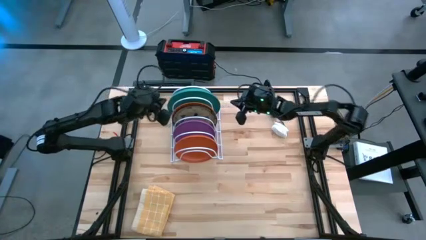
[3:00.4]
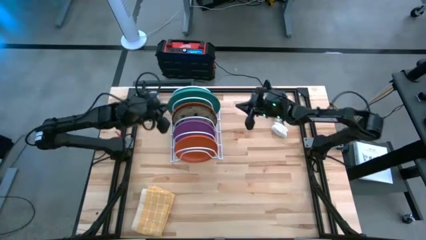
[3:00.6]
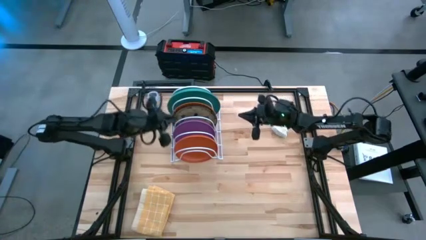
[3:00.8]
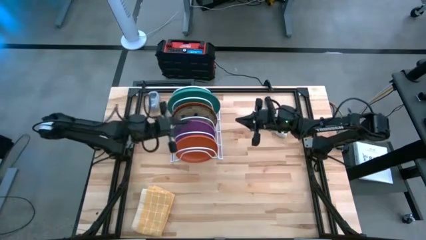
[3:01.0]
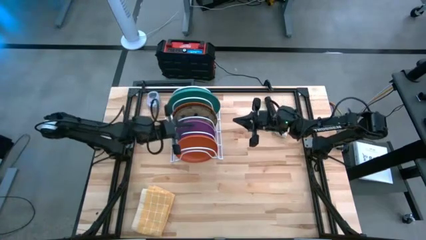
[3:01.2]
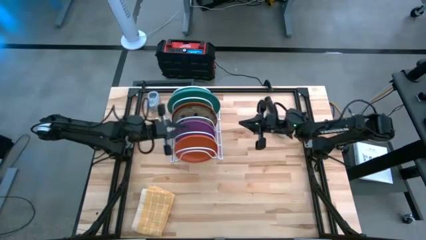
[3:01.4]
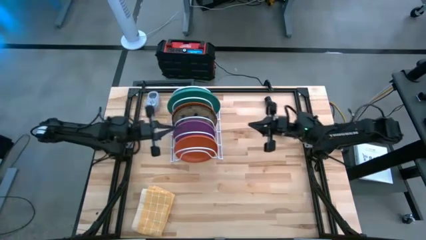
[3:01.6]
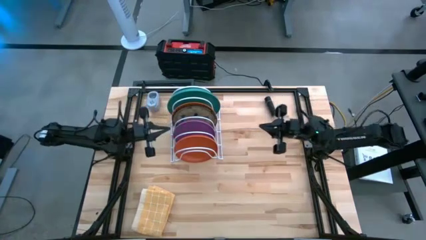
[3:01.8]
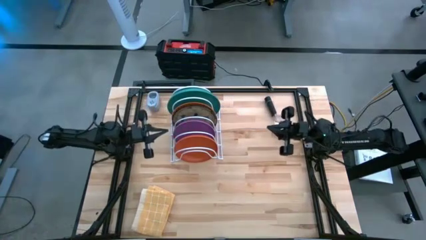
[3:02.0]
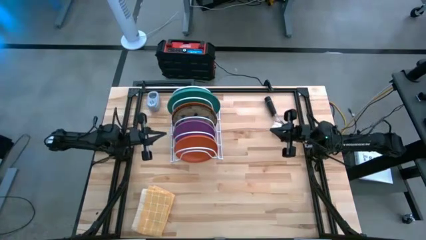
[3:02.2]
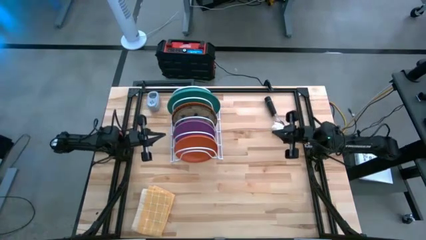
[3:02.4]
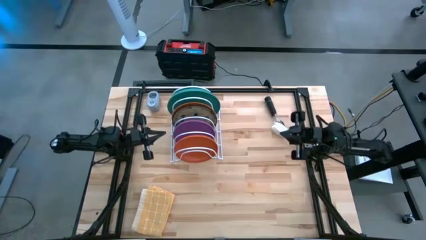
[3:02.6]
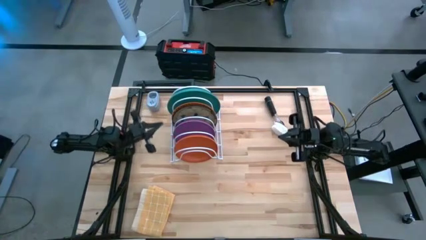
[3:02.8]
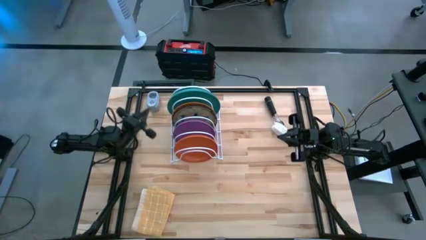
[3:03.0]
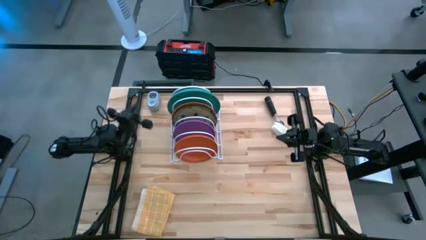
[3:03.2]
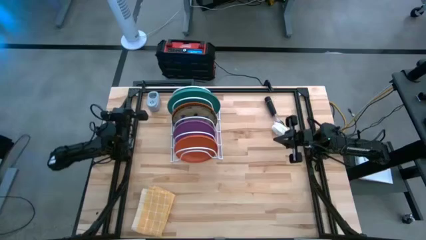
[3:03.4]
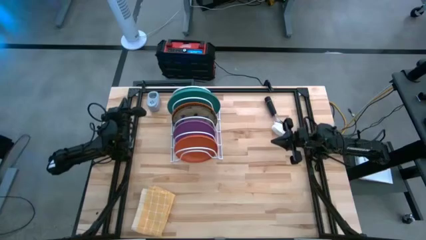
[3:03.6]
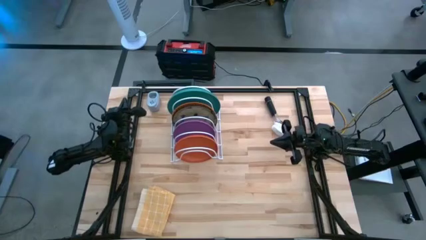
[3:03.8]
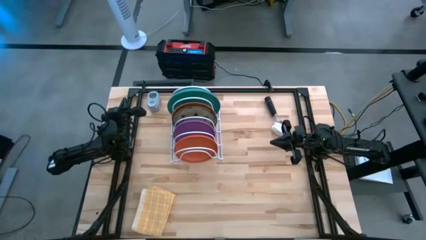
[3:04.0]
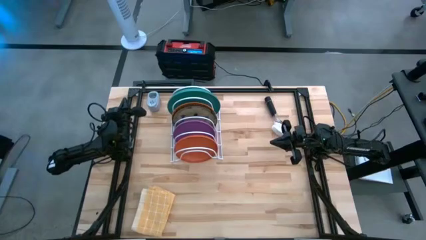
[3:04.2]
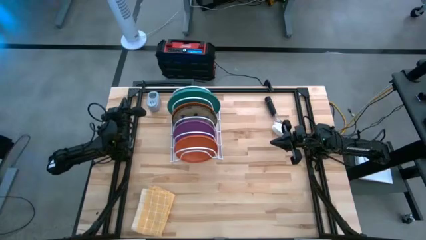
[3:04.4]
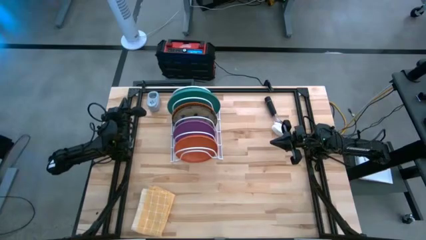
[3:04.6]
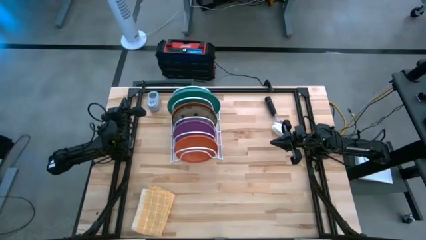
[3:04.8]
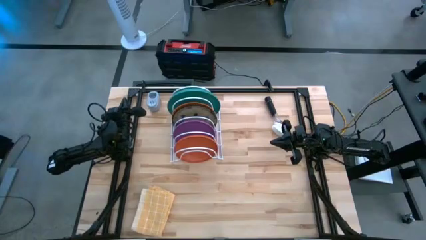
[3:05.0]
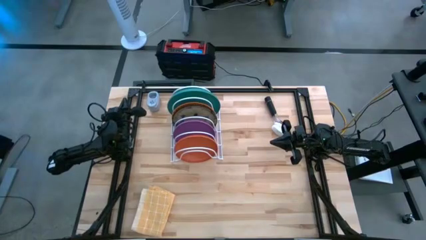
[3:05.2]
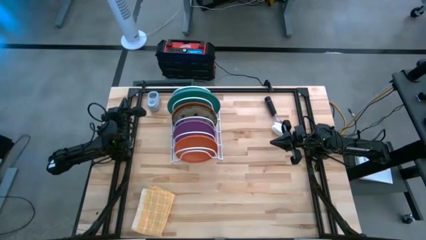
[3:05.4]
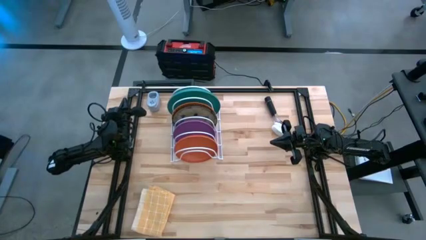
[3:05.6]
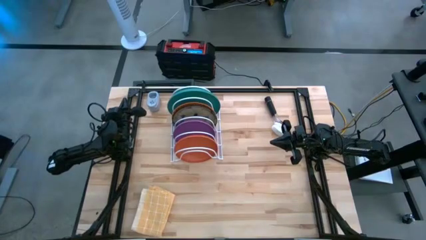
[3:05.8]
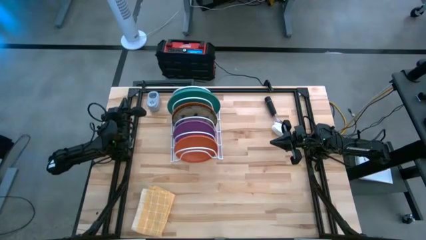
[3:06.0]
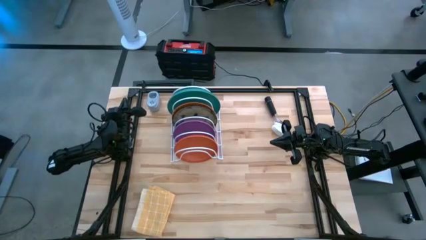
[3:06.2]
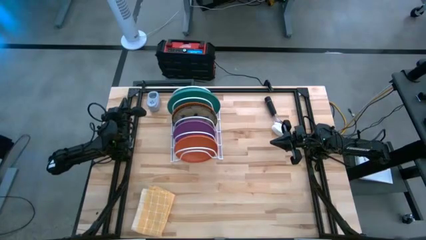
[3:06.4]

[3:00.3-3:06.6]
Task: Sort dishes
Return to Home Position

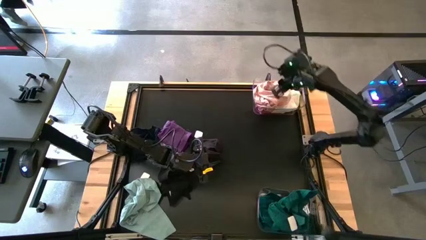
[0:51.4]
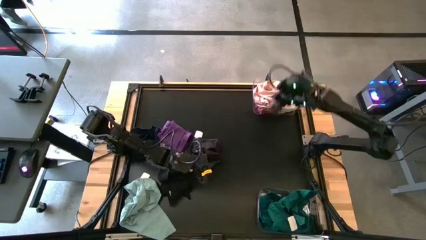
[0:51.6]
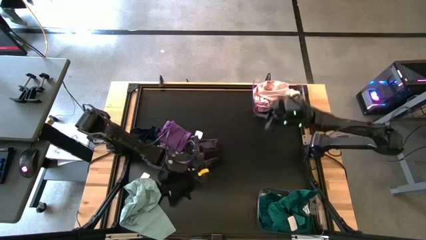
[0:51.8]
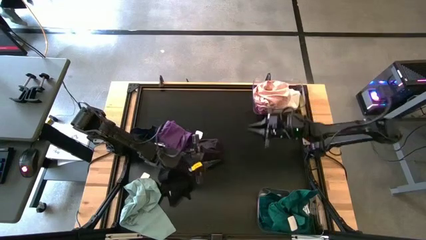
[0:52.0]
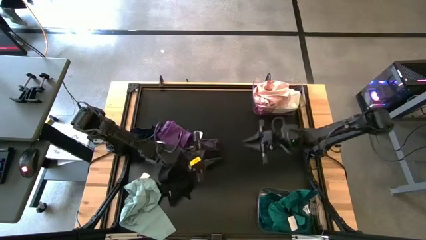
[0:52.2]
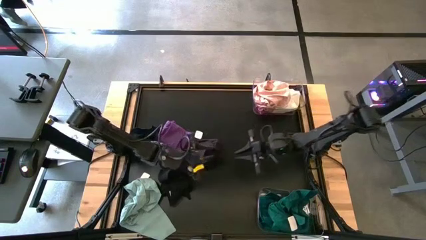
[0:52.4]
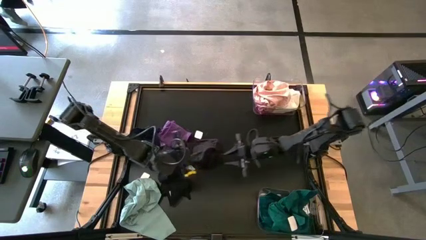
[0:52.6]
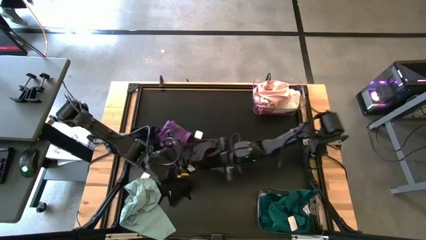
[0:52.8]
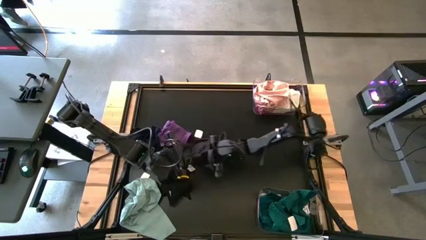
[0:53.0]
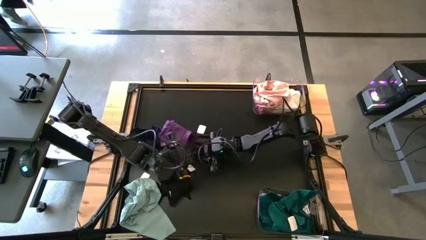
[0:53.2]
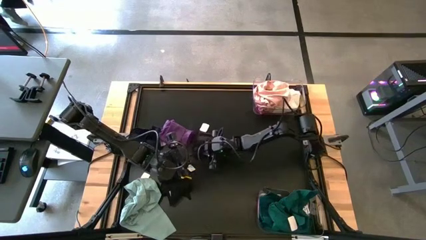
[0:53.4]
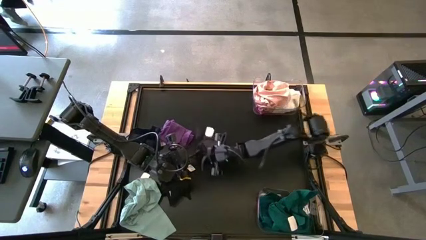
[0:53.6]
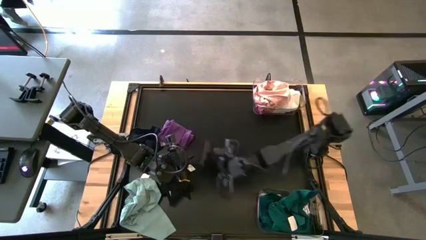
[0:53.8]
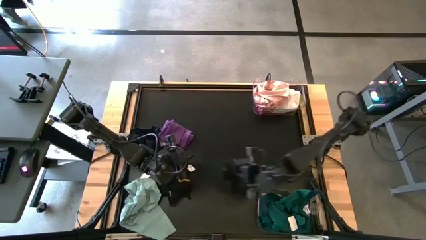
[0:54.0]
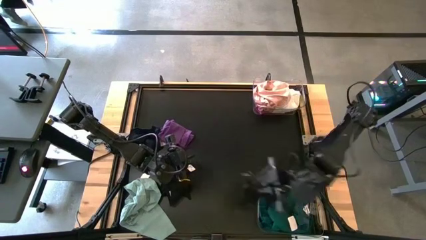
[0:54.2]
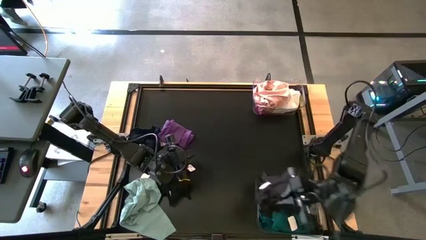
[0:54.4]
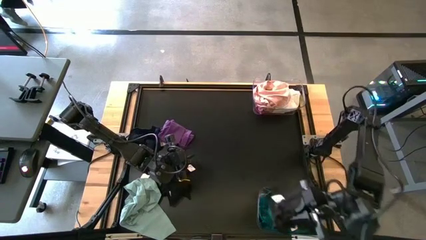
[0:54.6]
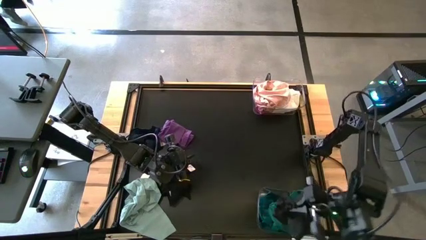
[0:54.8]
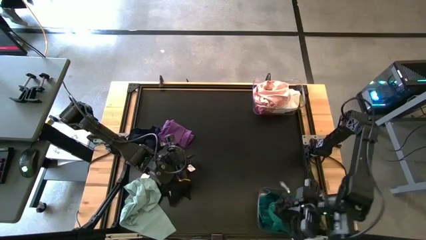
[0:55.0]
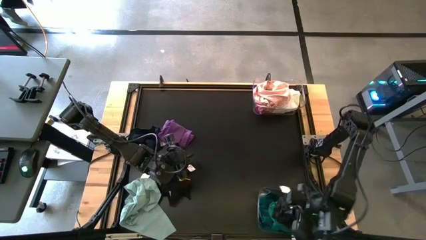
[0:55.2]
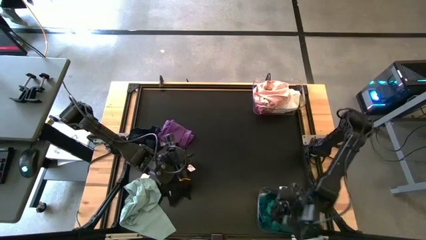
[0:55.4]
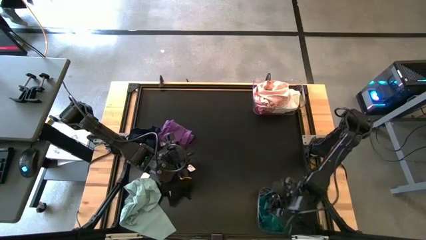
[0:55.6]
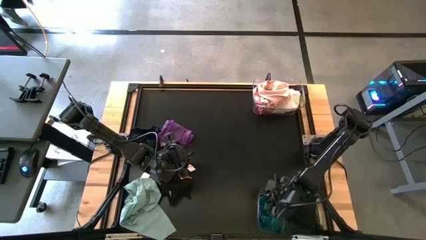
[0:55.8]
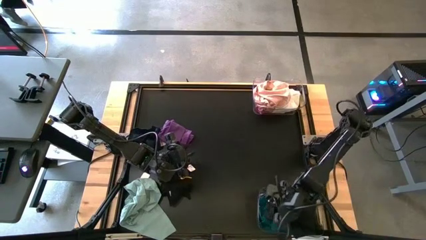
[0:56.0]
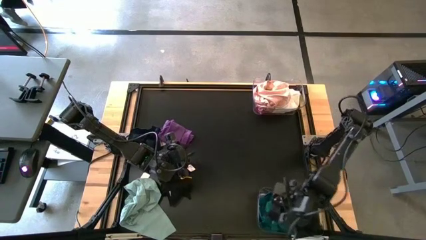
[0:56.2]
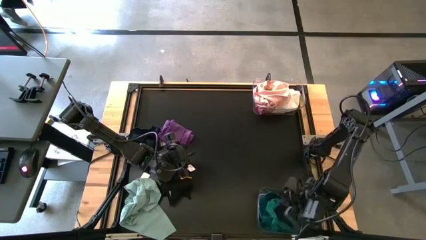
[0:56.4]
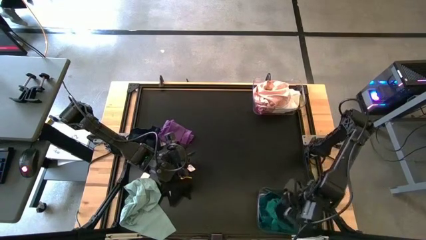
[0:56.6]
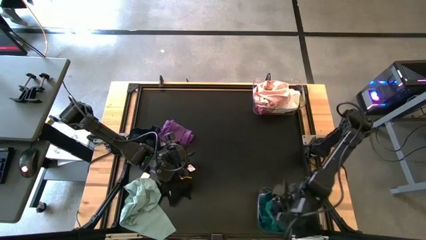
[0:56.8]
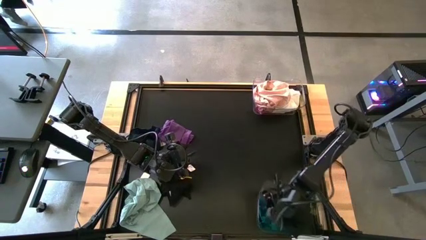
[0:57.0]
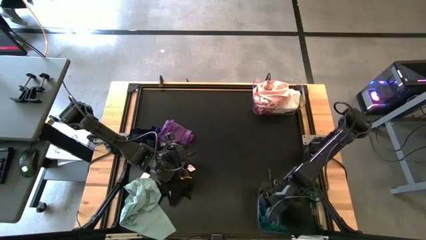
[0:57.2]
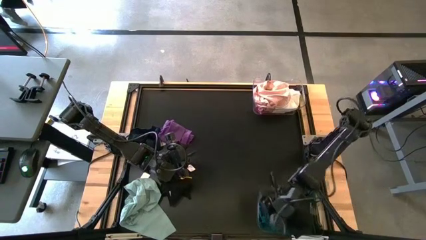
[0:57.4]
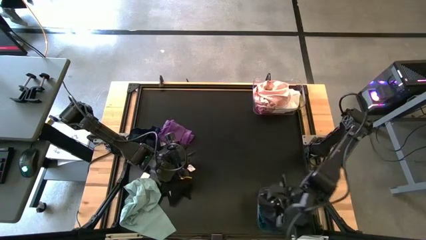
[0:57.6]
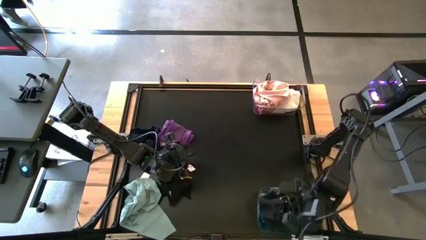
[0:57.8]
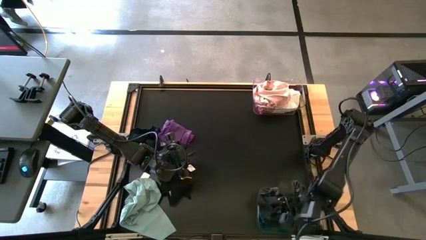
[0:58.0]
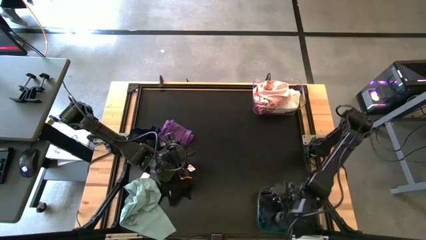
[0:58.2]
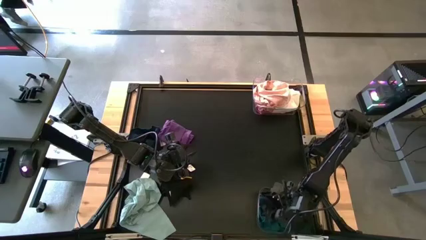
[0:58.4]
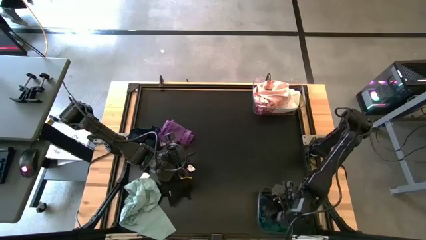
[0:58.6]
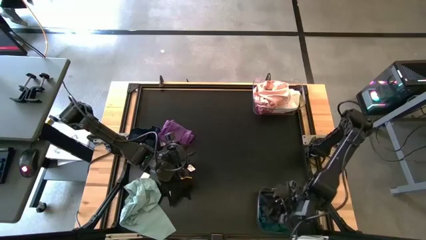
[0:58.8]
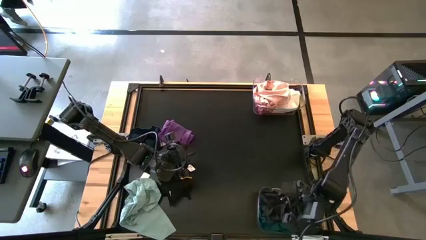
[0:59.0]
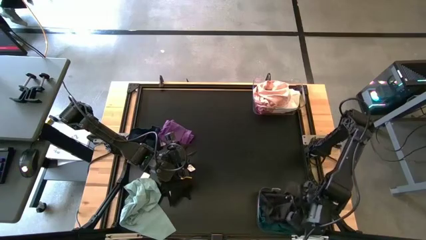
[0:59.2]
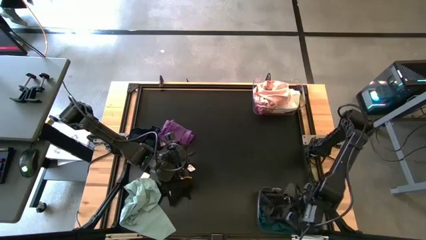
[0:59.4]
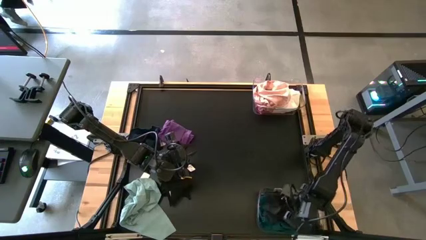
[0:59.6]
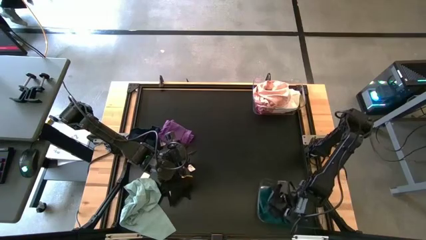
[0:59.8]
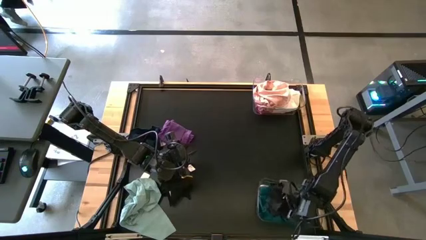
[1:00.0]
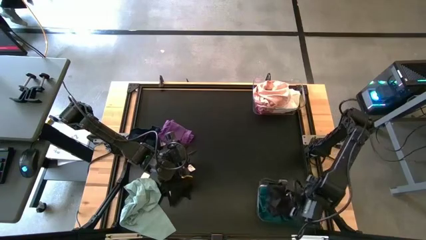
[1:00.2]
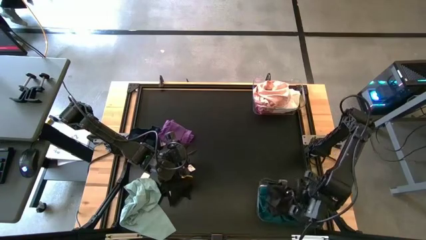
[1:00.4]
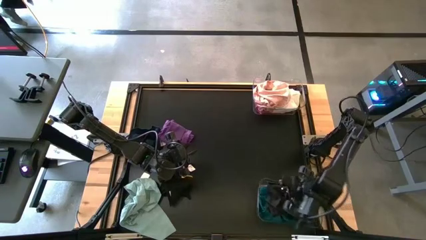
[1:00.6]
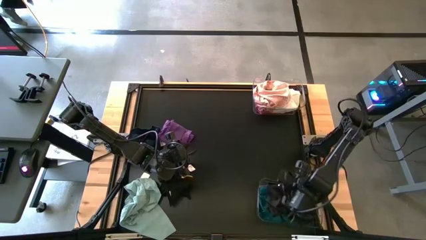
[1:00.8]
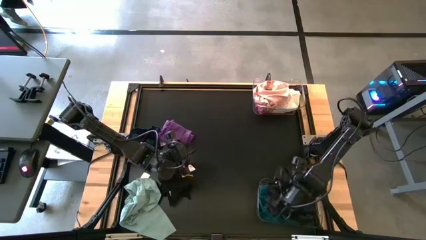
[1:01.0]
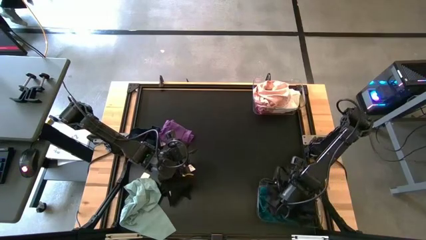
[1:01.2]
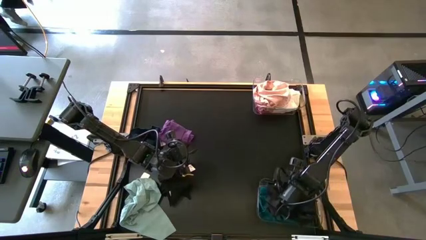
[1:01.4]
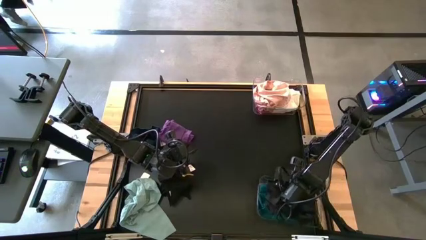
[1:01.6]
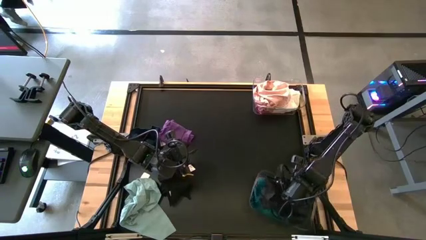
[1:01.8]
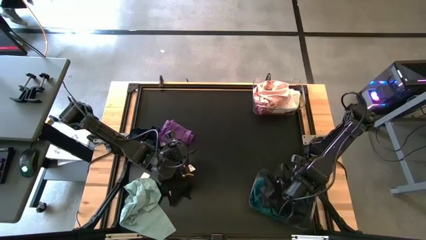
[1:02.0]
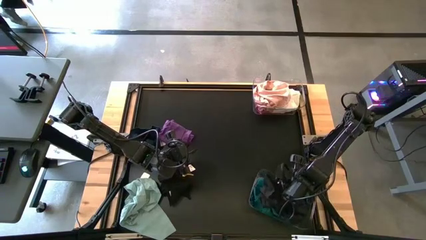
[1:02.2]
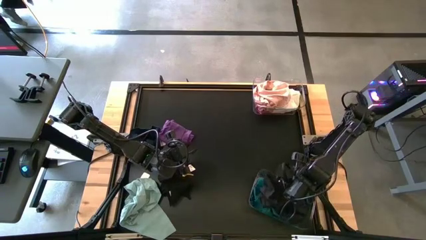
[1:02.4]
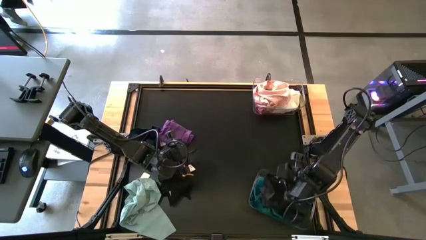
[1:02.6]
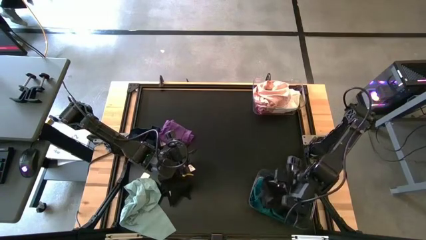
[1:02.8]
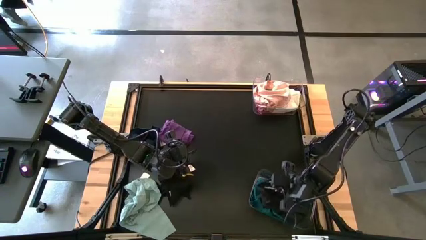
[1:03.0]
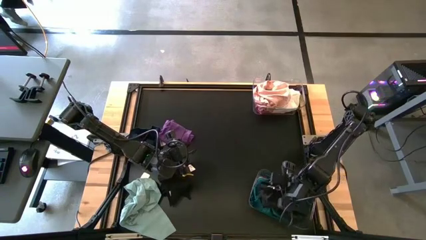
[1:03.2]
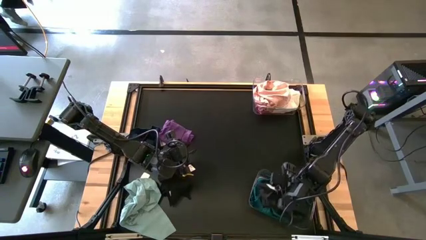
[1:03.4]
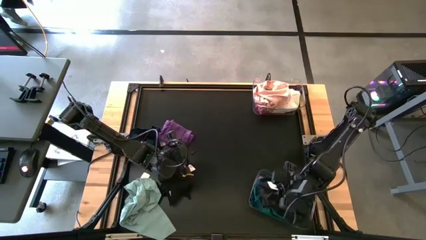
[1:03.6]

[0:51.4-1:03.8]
Task: Sort towels by color in basket
Put the top black towel into the bottom transparent bin
